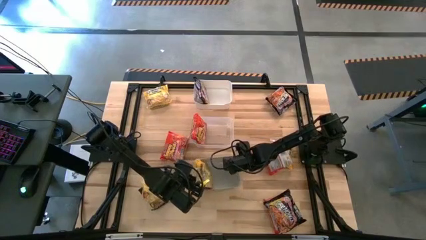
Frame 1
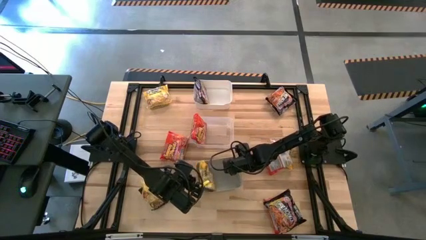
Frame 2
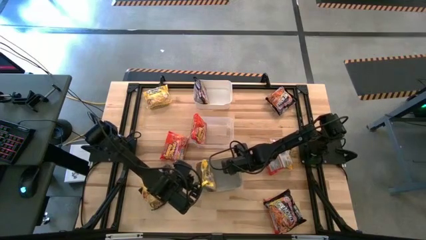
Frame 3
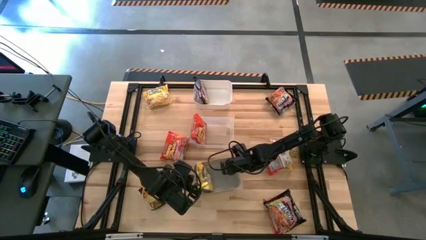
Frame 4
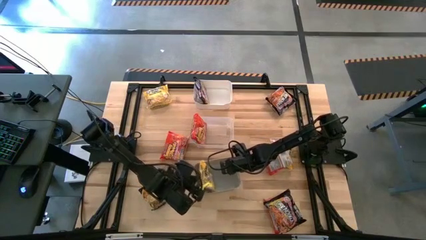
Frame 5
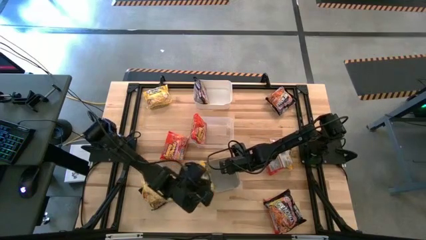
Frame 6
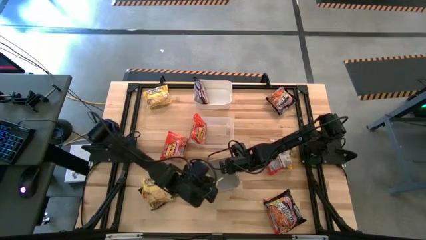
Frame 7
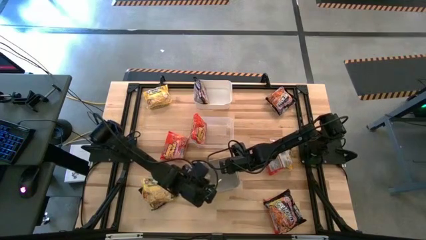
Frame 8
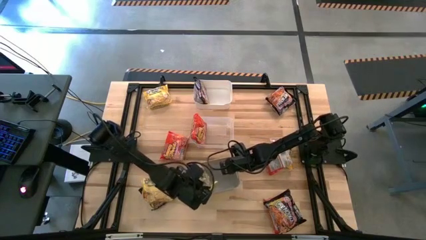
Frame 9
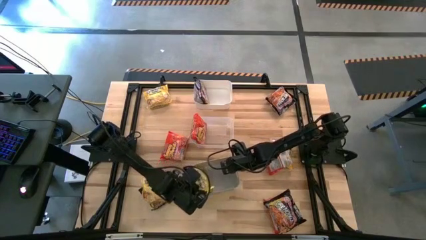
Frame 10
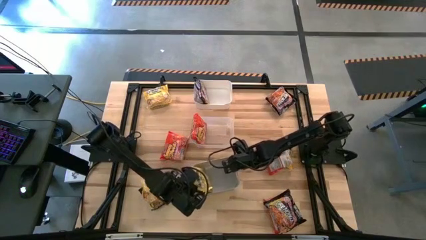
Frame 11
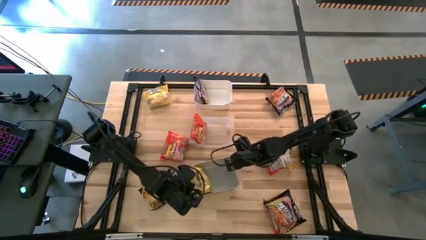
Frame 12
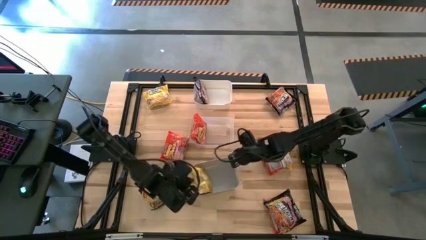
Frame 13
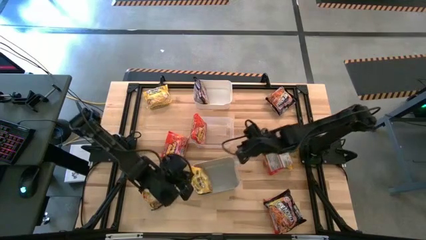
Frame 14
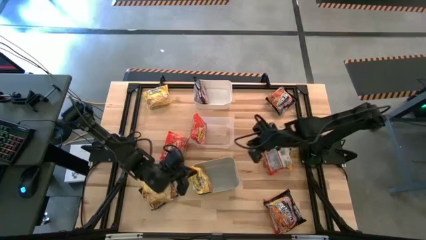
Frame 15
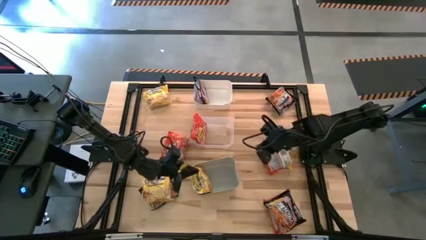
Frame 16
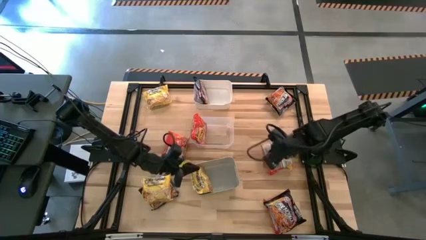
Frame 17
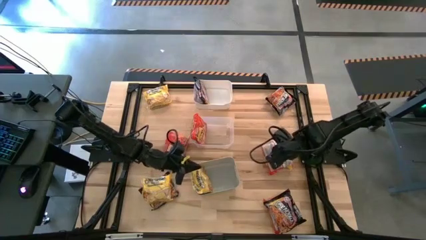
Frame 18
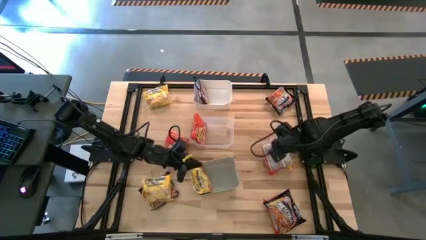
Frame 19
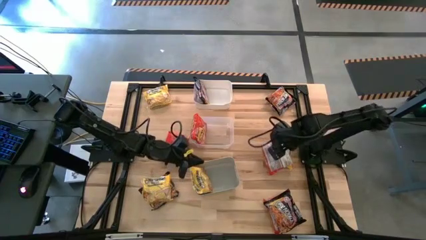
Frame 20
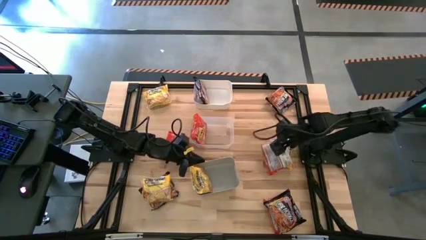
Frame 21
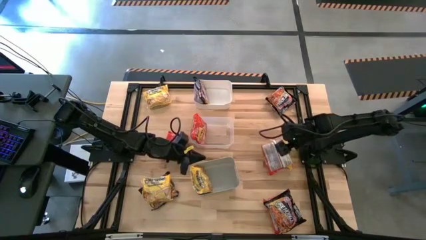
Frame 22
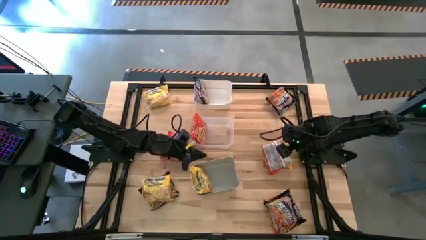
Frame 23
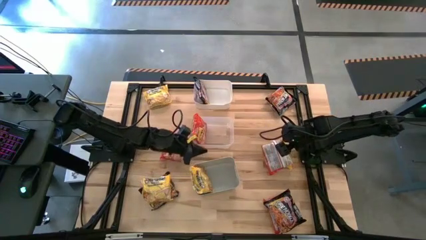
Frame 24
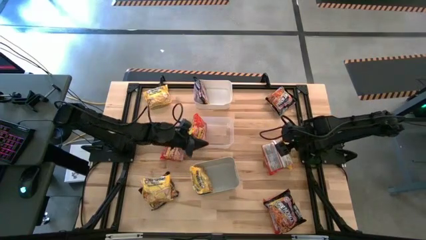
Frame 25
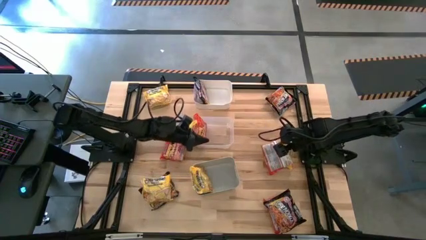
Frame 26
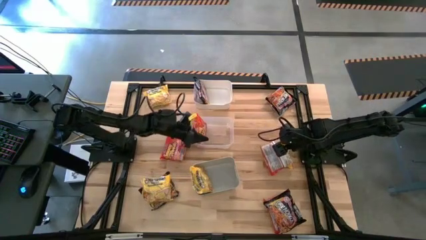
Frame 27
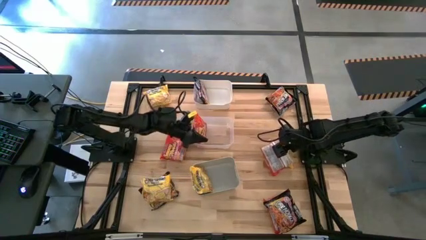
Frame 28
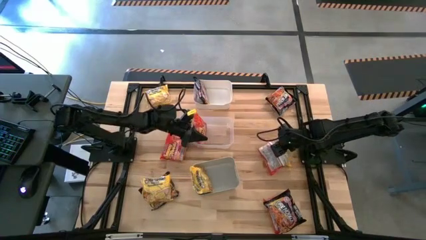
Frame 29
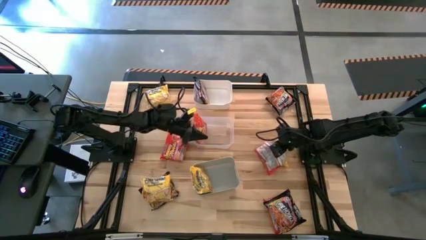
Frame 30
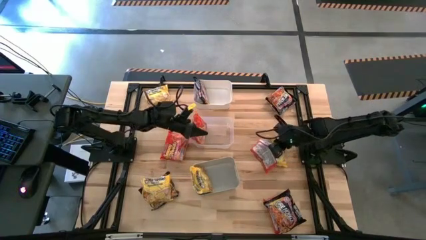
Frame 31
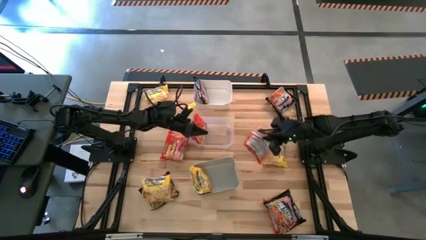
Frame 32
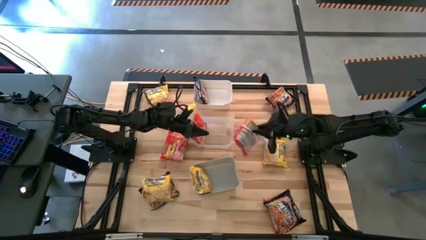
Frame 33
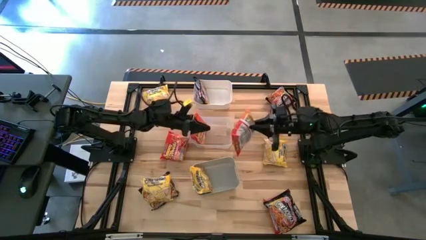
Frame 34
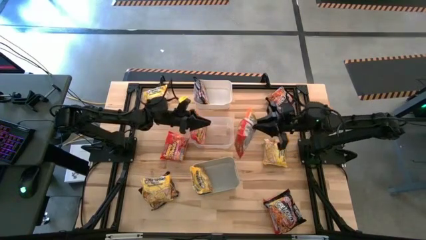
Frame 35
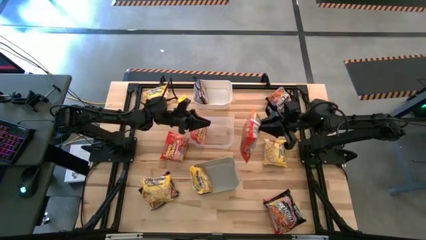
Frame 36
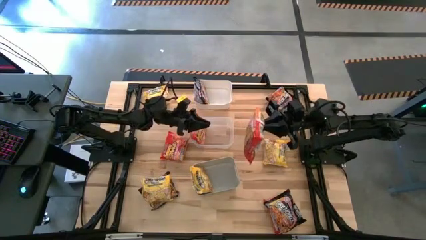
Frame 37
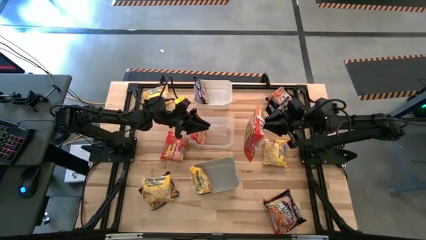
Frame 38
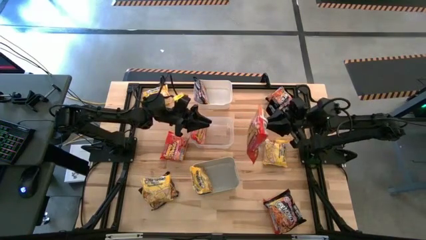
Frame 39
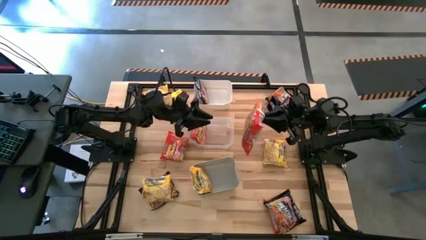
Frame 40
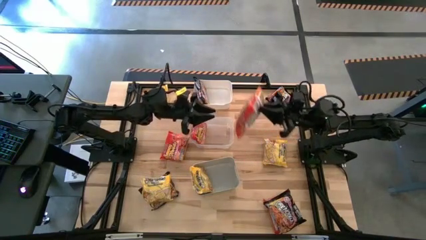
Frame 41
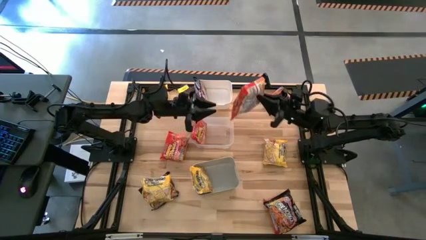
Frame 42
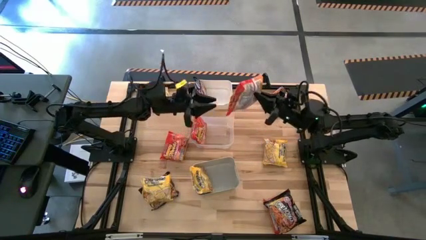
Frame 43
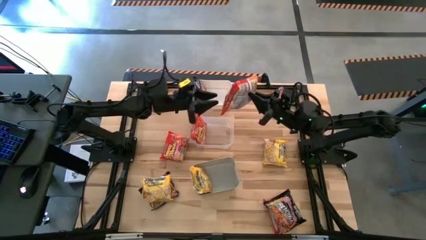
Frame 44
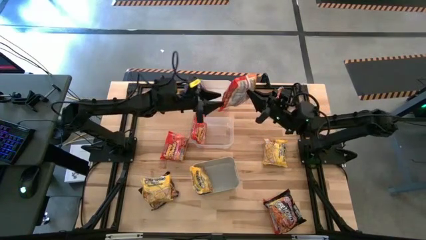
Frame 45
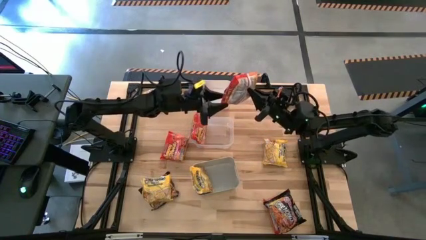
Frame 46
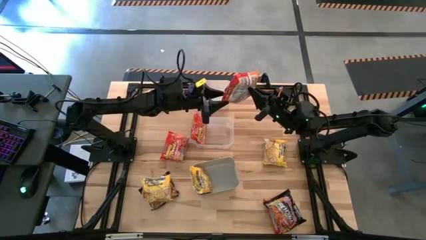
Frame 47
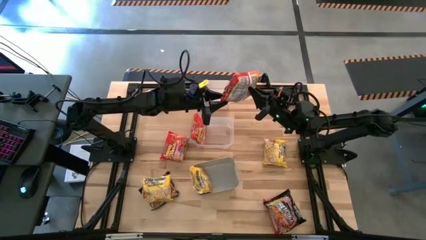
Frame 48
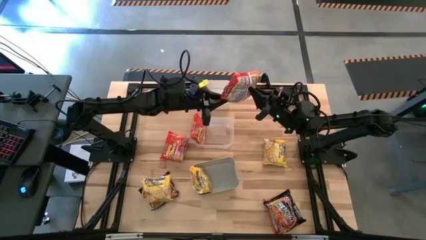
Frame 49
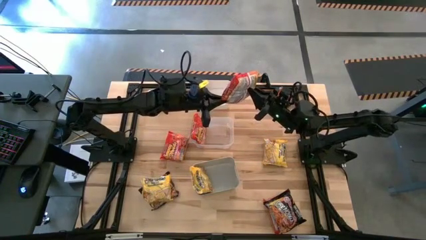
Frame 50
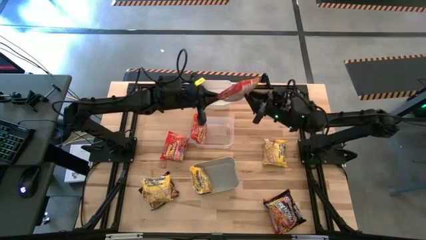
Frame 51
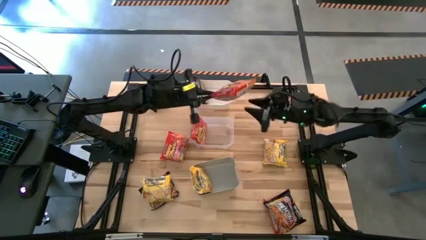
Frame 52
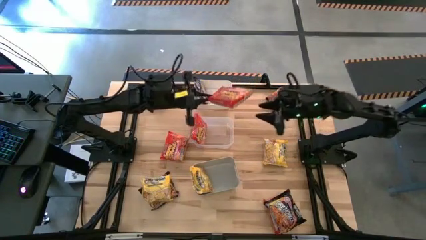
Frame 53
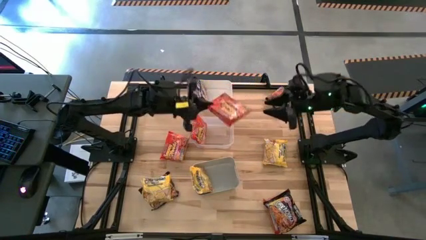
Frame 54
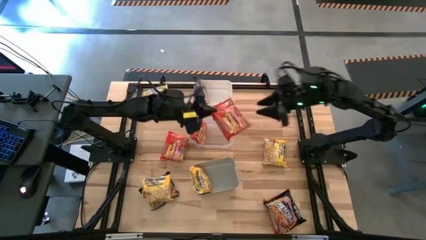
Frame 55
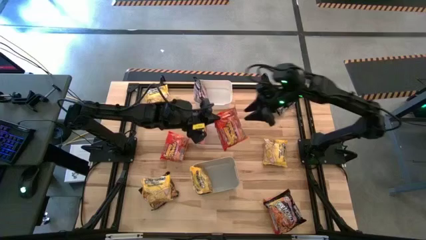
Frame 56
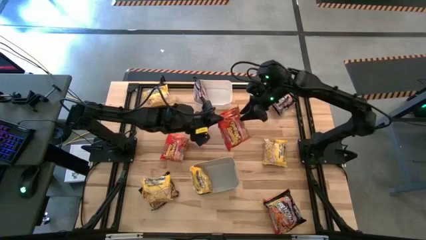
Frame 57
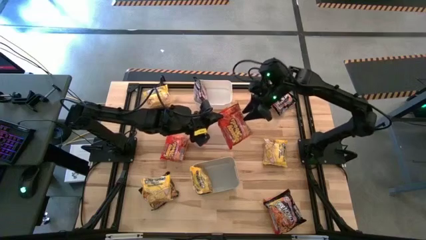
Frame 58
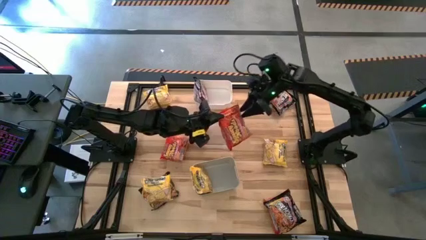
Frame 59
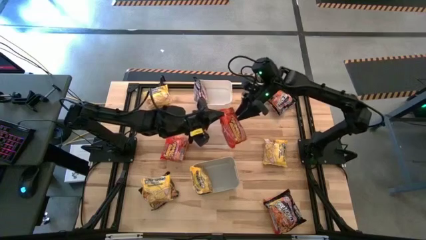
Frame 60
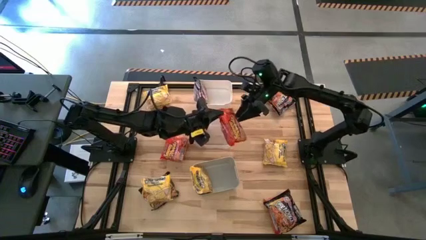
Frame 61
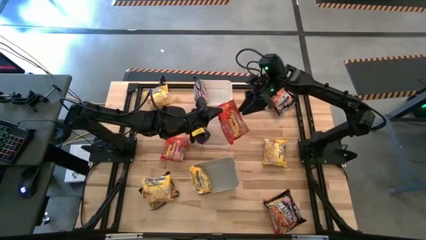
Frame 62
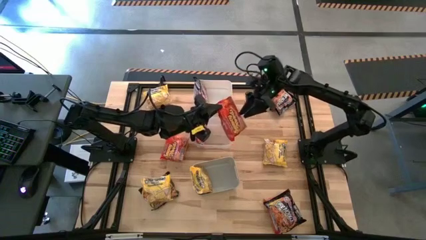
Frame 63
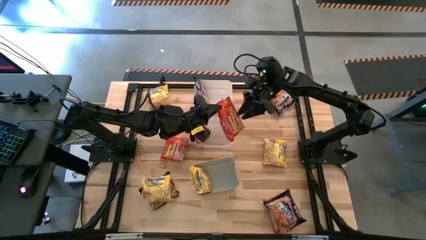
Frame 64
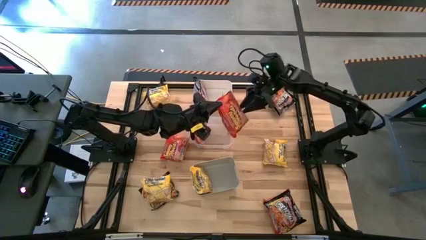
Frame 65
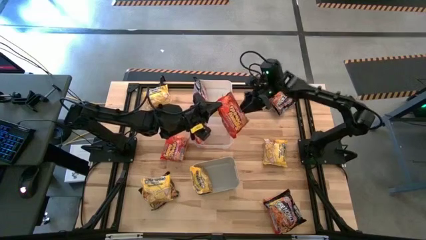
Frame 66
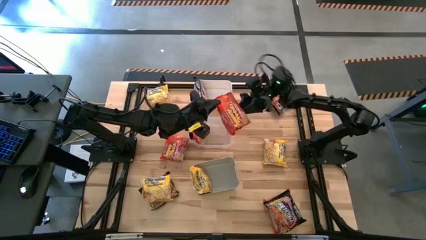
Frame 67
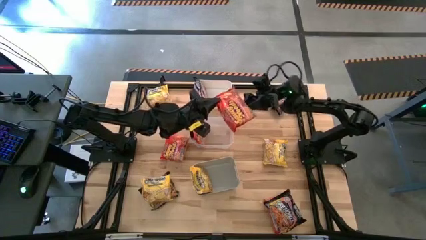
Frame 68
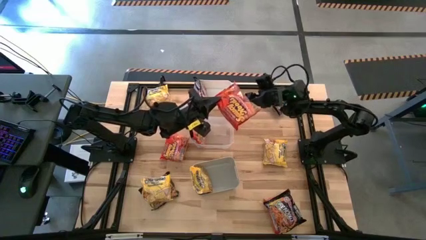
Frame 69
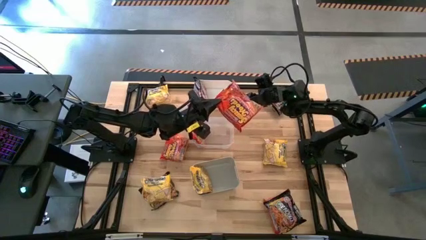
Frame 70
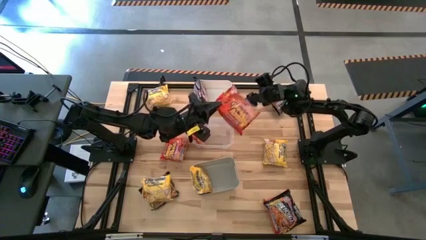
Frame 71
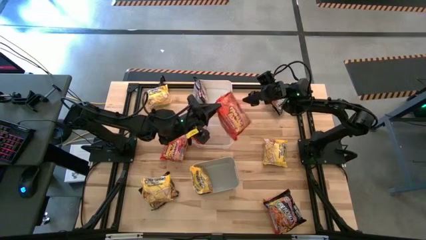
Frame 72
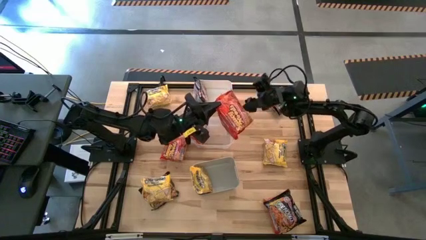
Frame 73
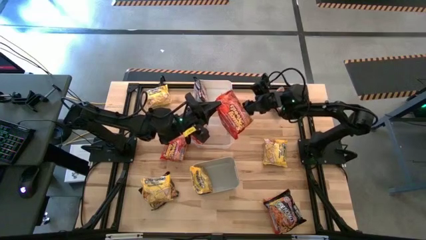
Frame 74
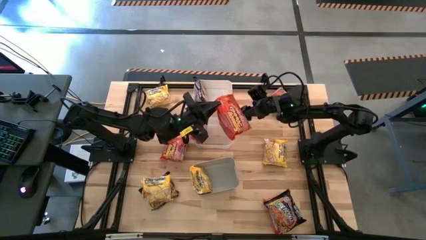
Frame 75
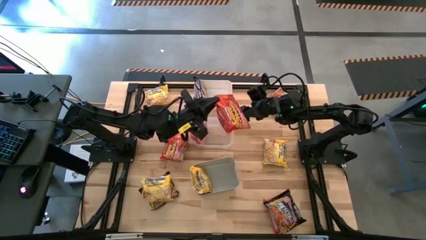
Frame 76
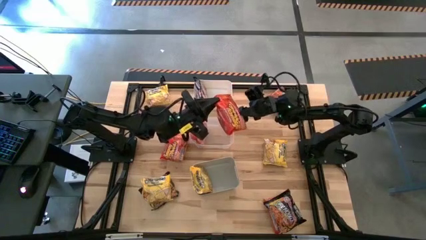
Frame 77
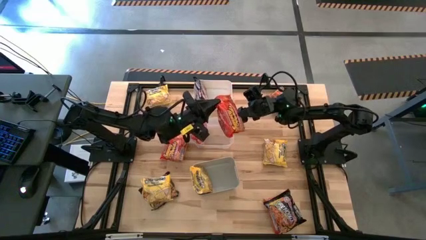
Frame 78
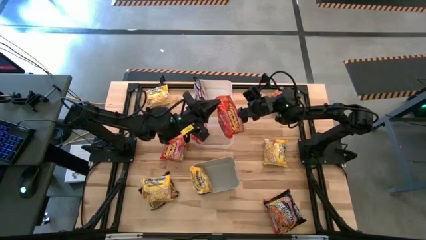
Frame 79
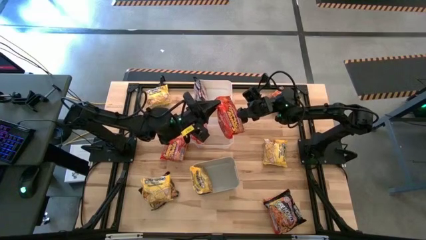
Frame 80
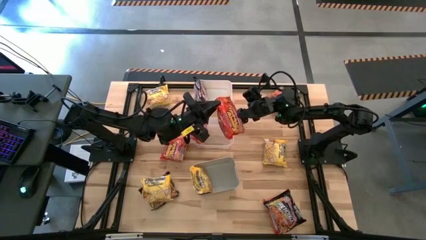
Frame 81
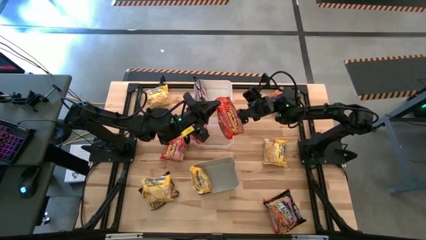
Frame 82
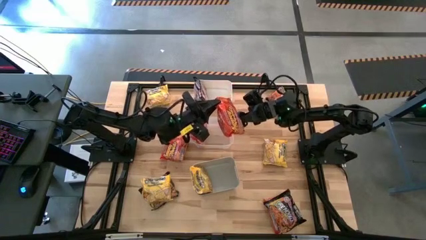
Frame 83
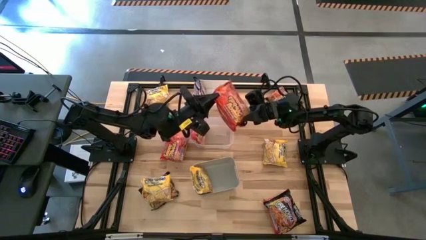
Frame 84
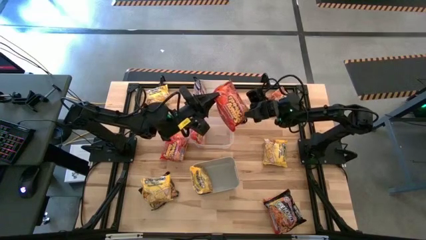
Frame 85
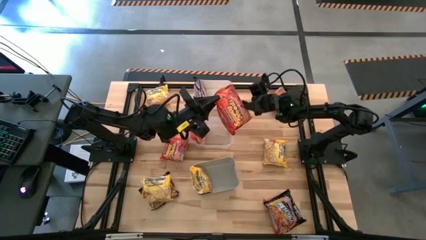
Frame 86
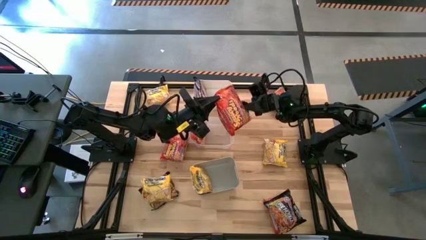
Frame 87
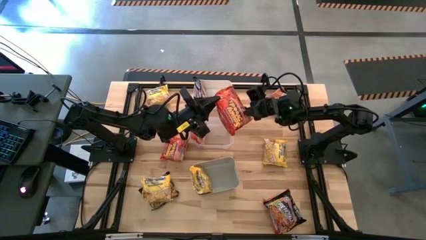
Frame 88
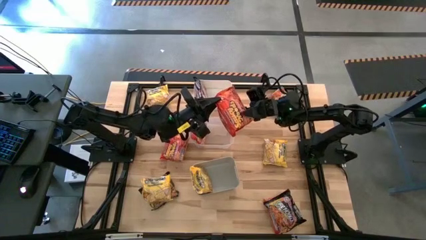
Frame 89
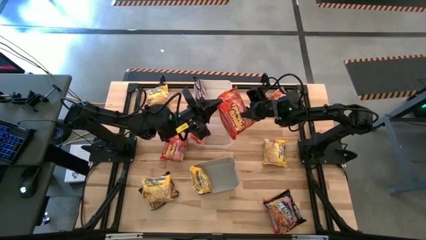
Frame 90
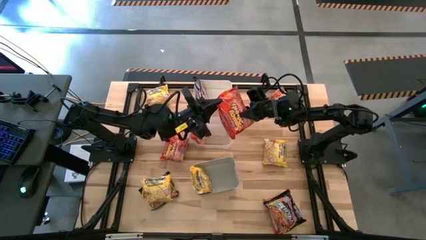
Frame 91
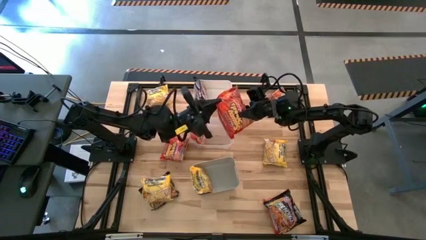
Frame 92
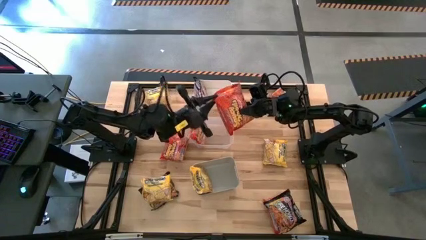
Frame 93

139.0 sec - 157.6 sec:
Task: Sort Maruchan noodles
Put the orange noodle pack into the transparent bin
